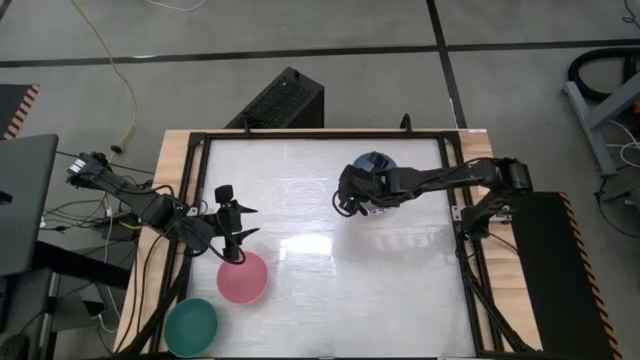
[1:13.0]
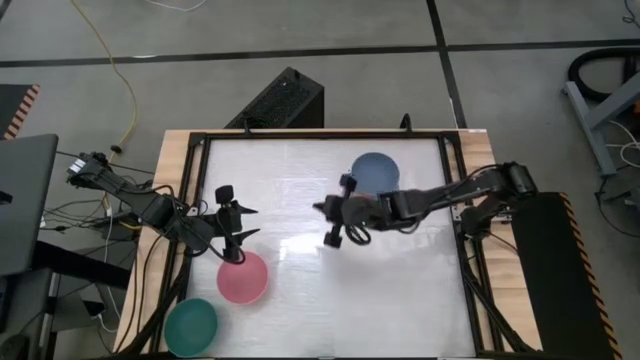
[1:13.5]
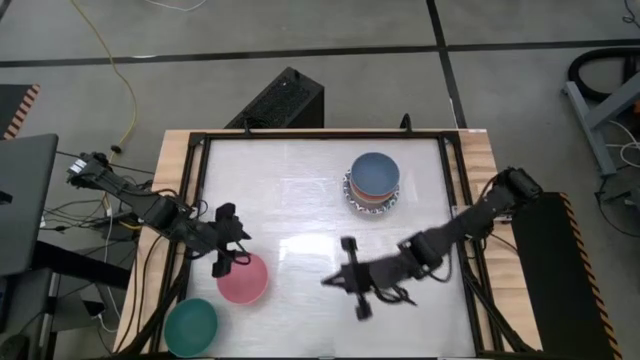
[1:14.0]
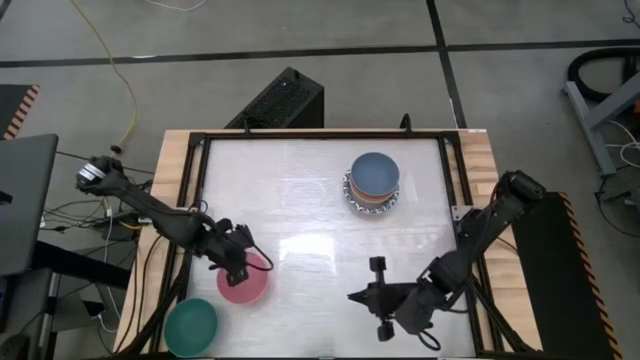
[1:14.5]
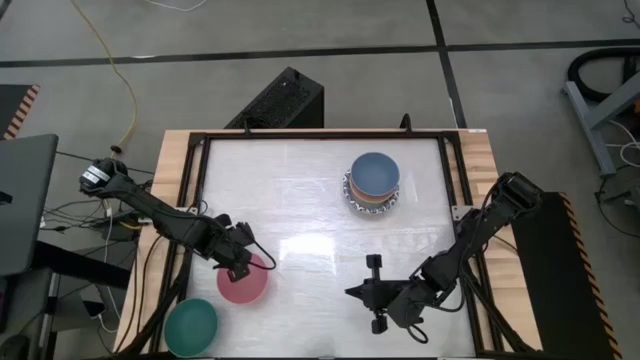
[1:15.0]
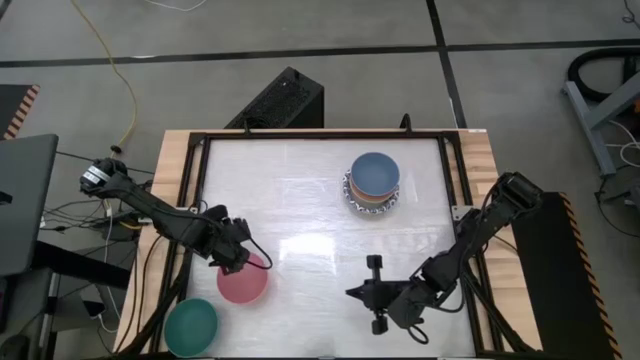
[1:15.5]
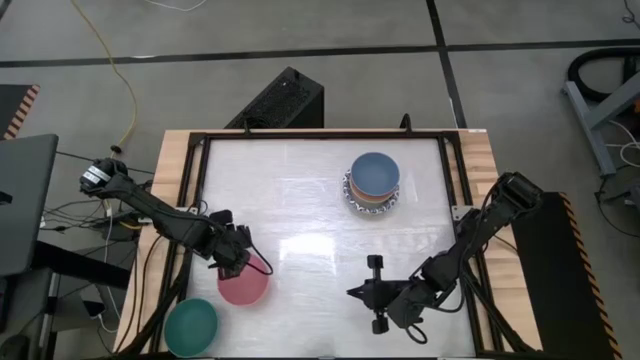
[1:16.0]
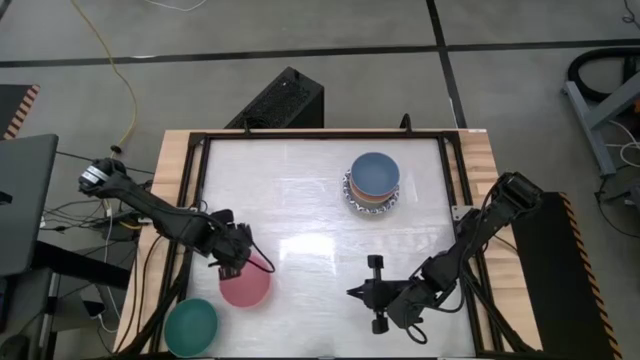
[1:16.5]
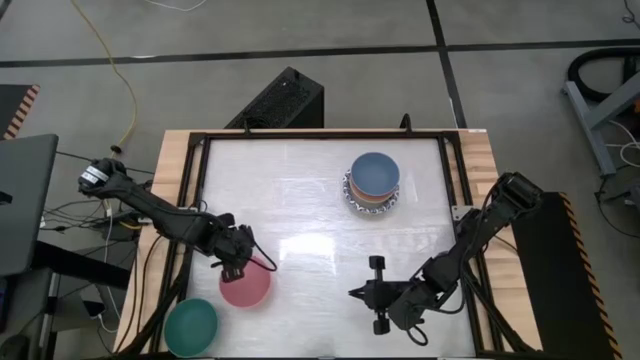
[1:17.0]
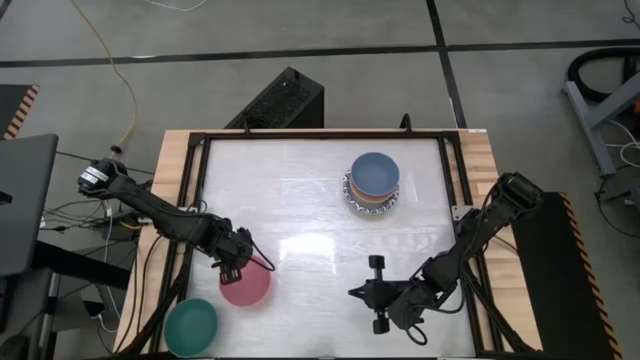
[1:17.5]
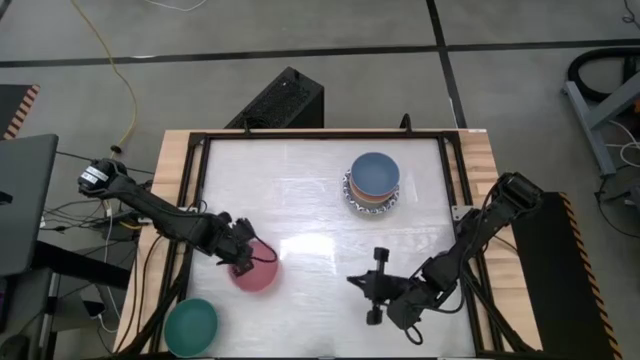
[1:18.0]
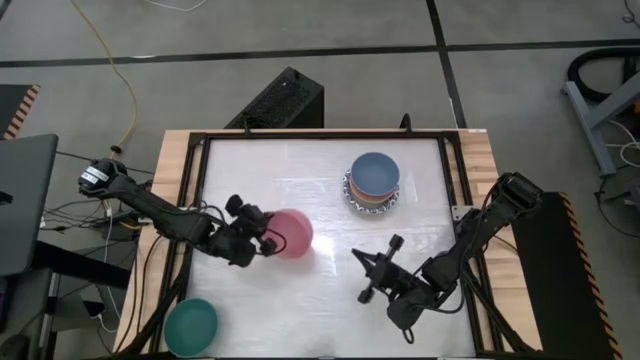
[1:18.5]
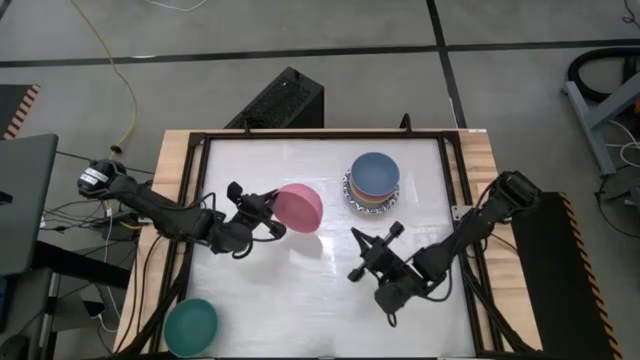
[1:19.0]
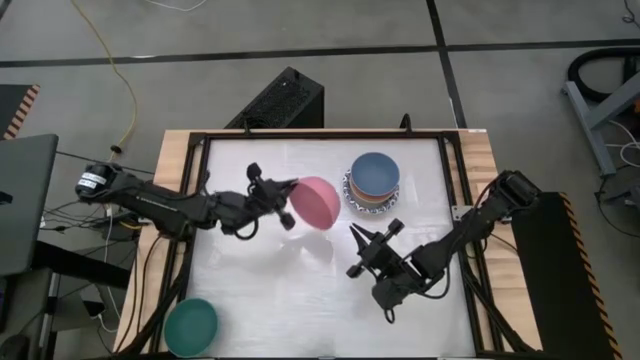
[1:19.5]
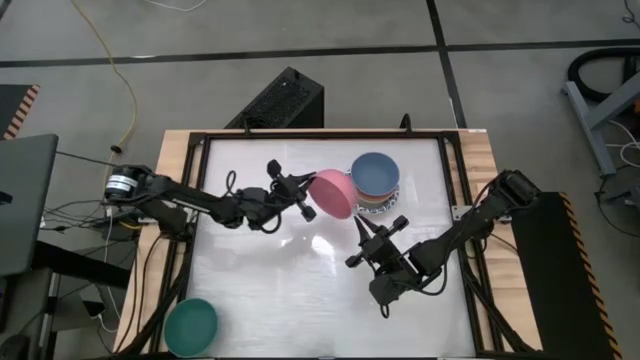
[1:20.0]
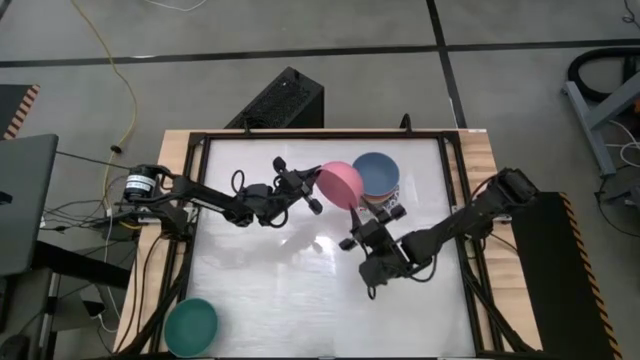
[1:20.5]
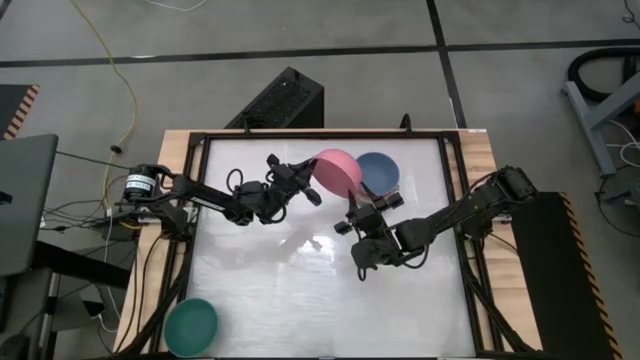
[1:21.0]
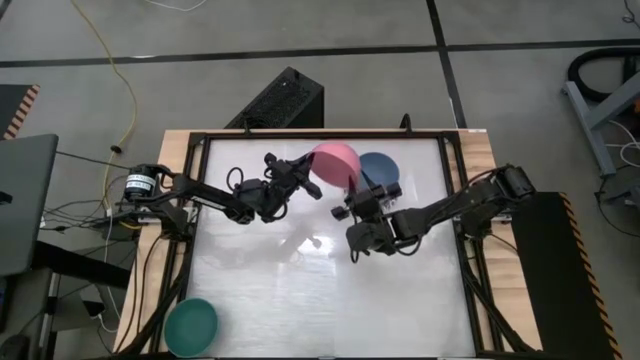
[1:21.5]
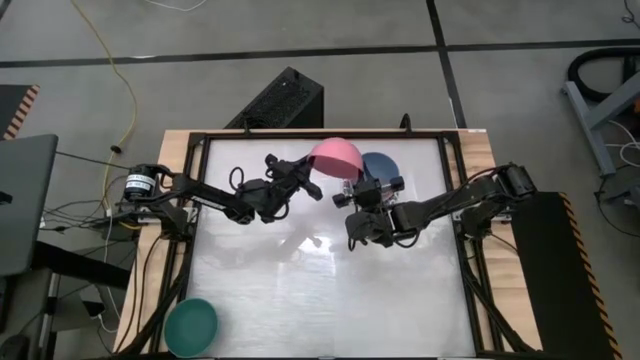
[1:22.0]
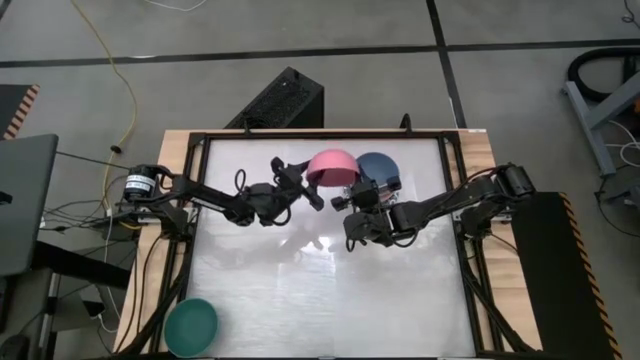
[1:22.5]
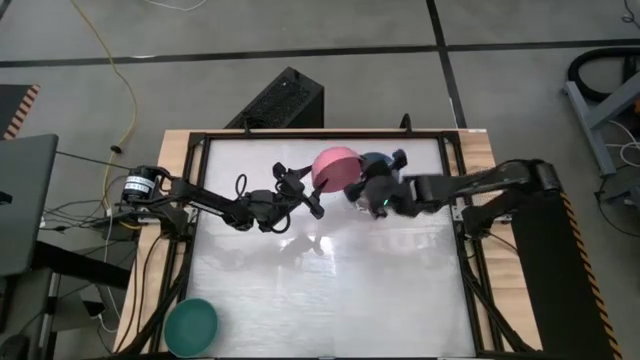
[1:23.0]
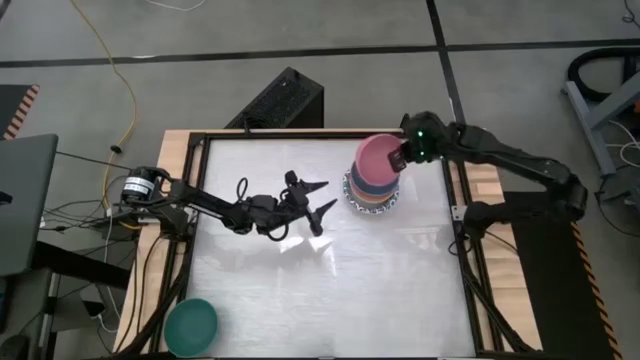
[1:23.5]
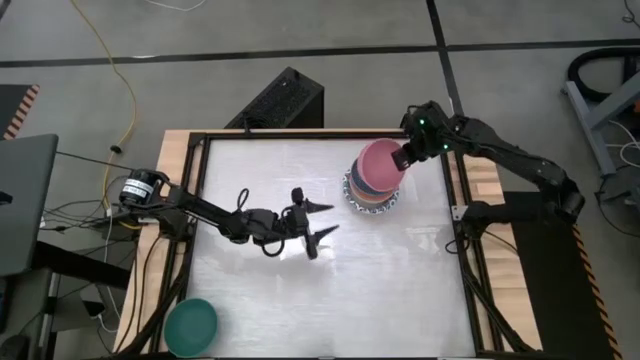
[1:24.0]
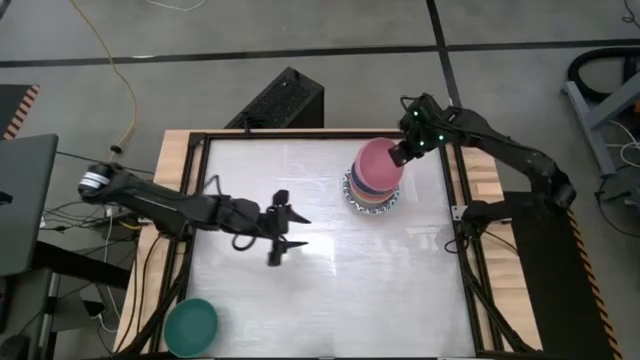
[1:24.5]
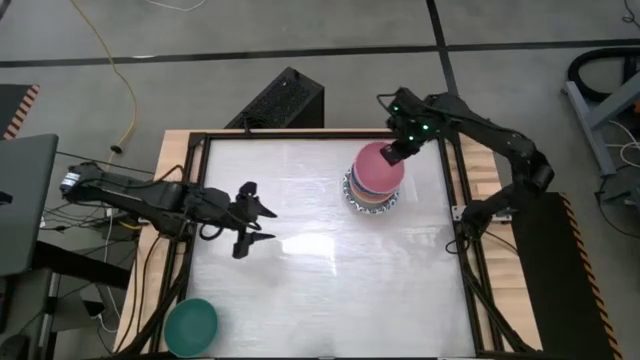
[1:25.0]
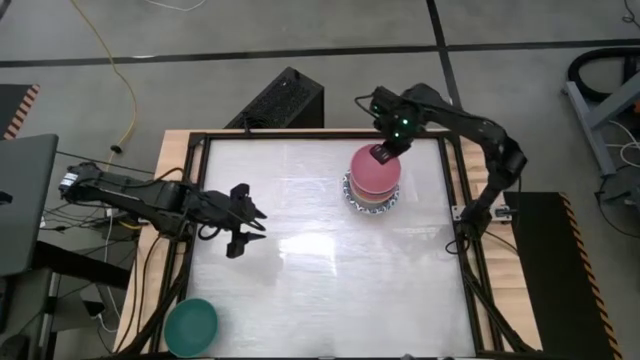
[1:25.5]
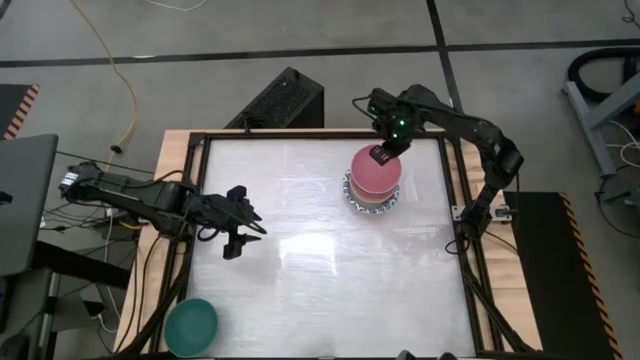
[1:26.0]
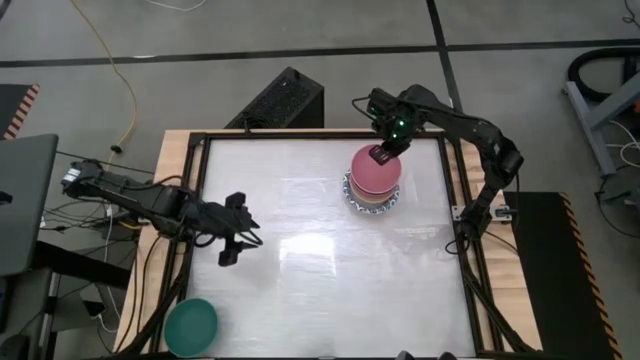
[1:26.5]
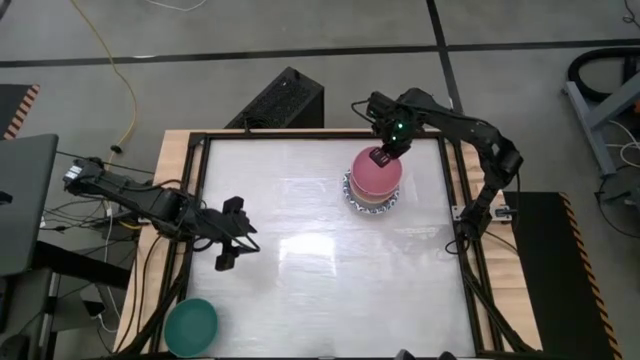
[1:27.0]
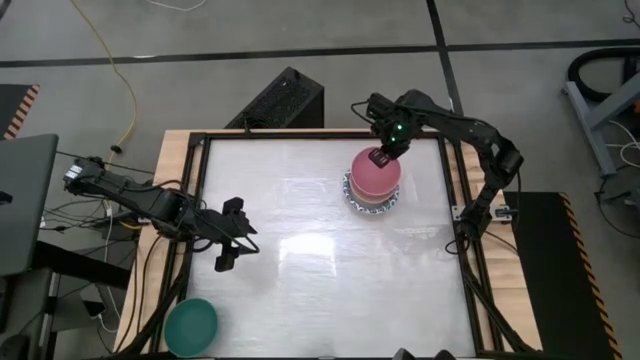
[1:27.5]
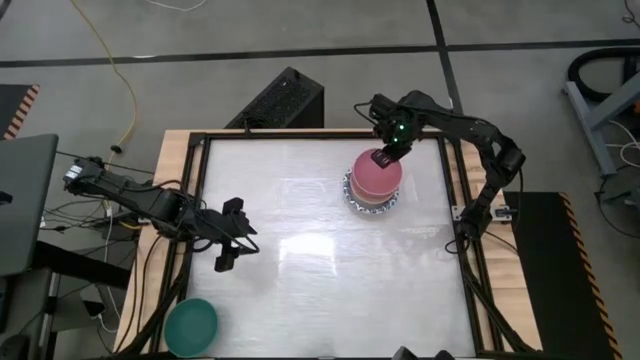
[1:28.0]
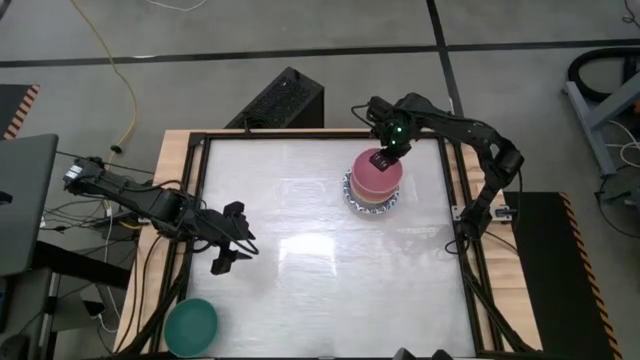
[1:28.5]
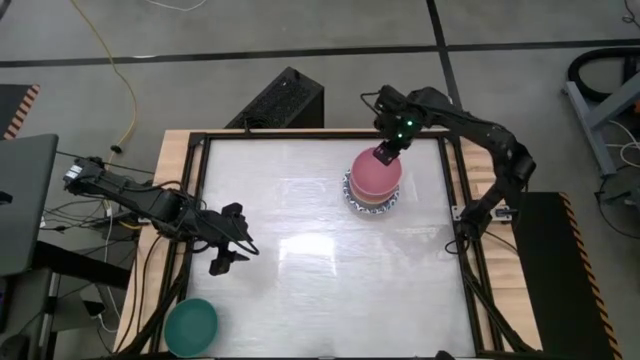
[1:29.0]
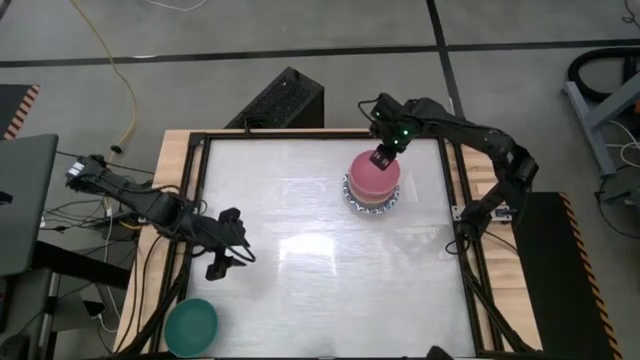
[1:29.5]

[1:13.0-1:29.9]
Stack the pink bowl on top of the blue bowl
